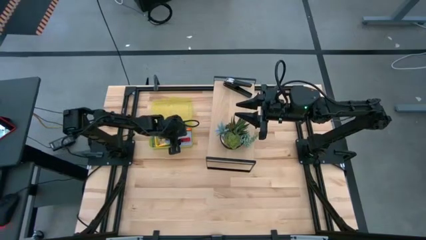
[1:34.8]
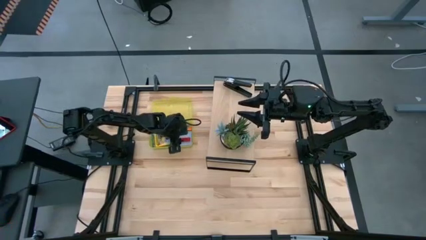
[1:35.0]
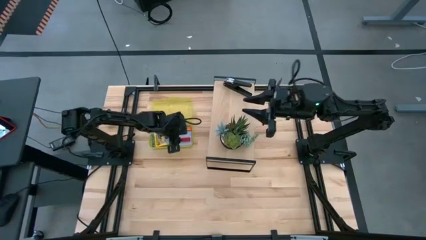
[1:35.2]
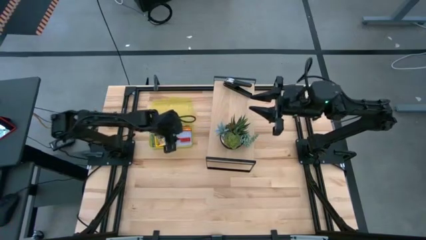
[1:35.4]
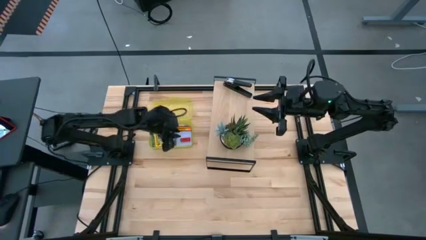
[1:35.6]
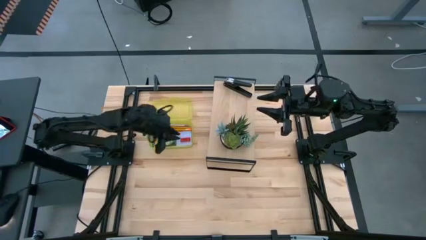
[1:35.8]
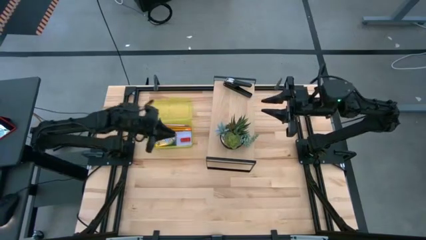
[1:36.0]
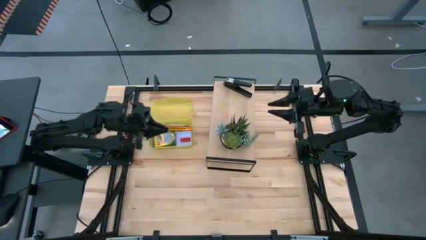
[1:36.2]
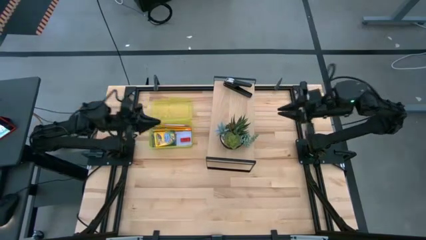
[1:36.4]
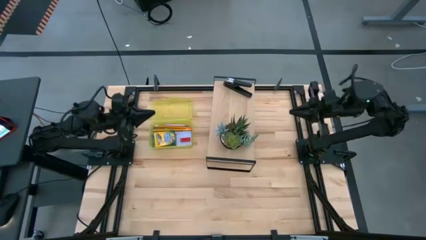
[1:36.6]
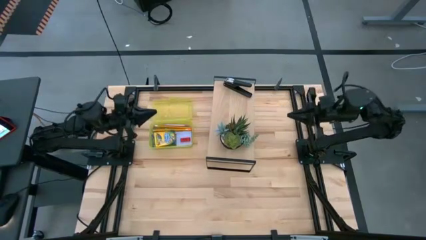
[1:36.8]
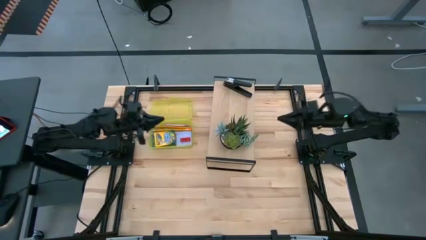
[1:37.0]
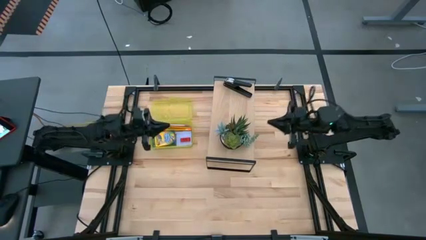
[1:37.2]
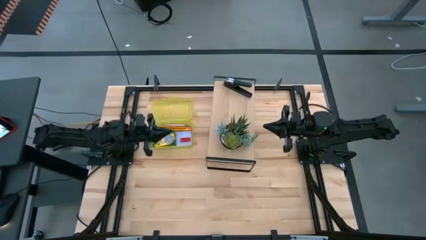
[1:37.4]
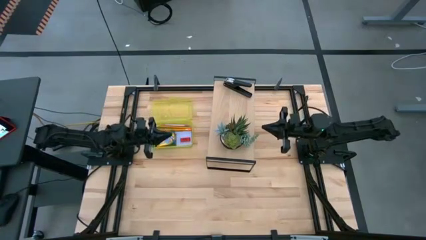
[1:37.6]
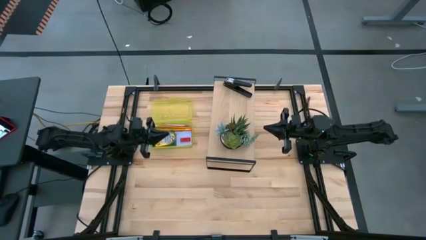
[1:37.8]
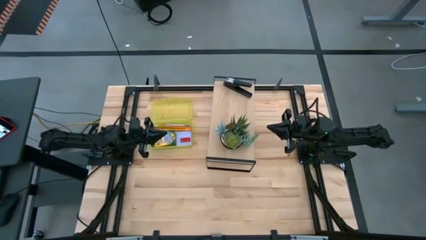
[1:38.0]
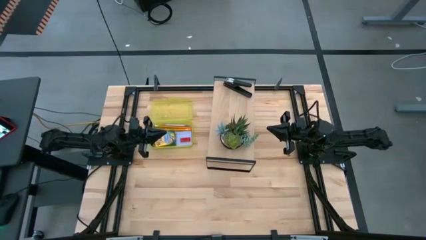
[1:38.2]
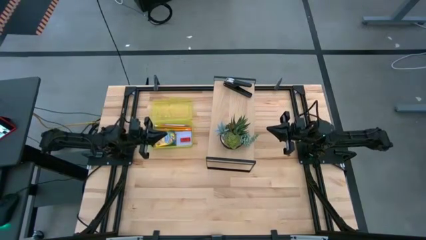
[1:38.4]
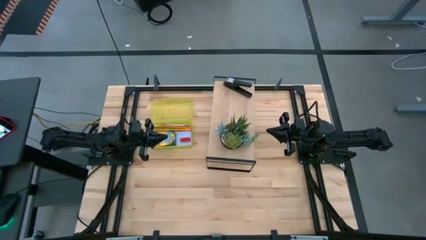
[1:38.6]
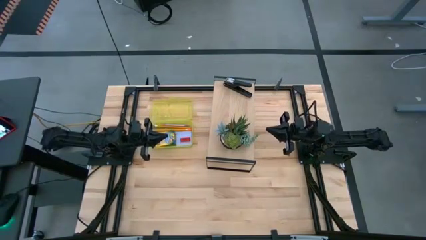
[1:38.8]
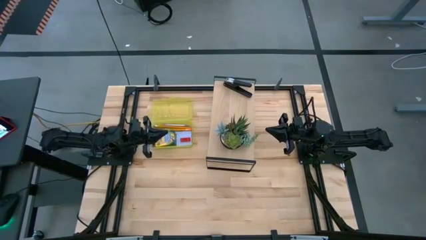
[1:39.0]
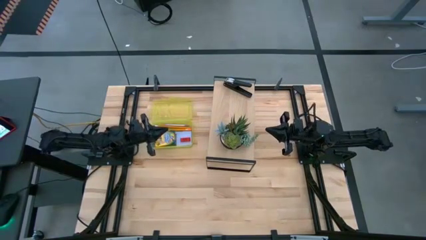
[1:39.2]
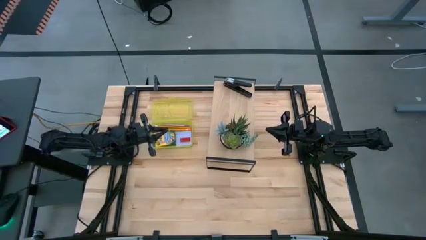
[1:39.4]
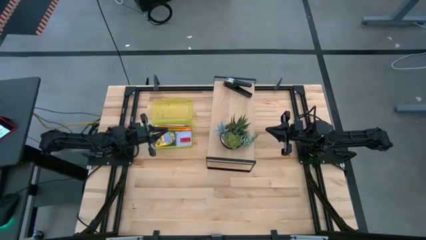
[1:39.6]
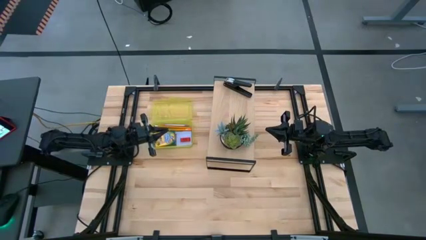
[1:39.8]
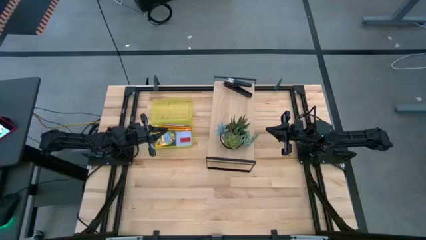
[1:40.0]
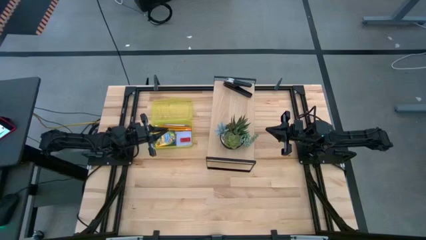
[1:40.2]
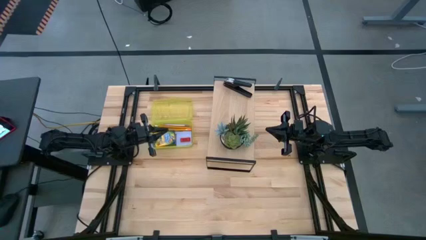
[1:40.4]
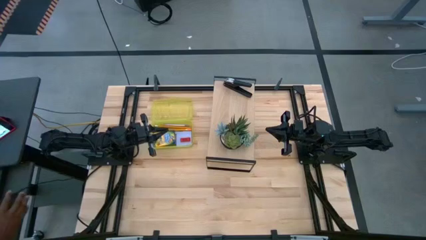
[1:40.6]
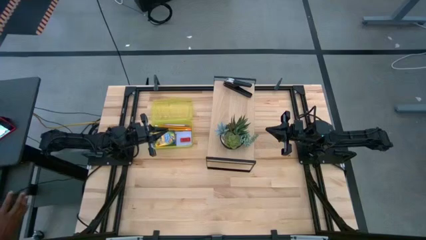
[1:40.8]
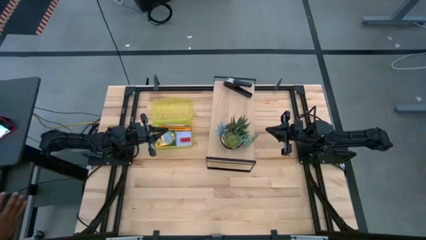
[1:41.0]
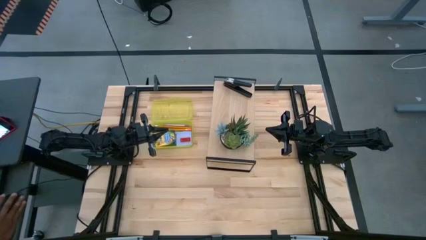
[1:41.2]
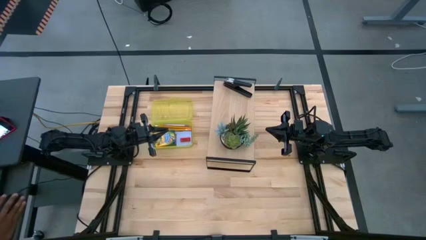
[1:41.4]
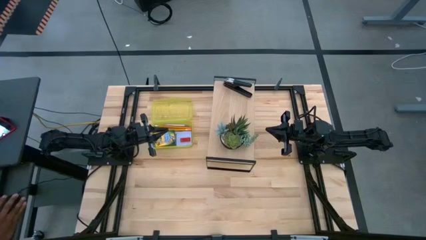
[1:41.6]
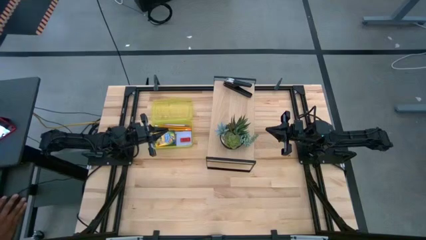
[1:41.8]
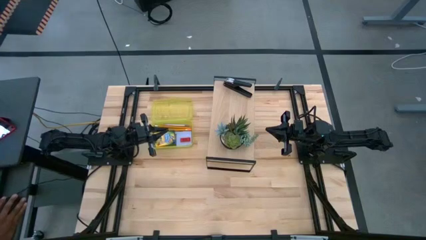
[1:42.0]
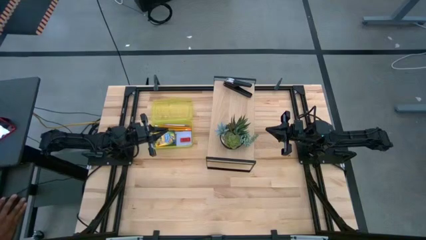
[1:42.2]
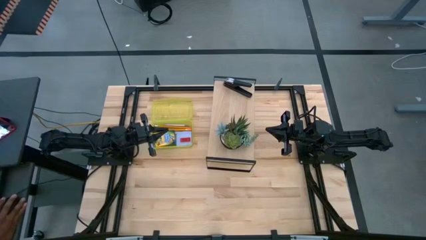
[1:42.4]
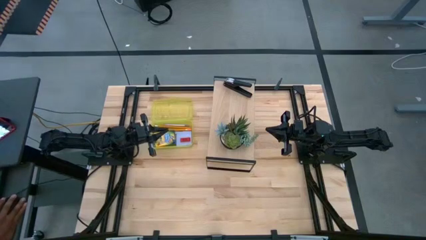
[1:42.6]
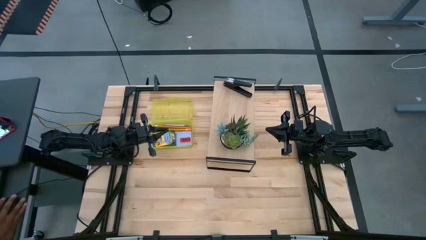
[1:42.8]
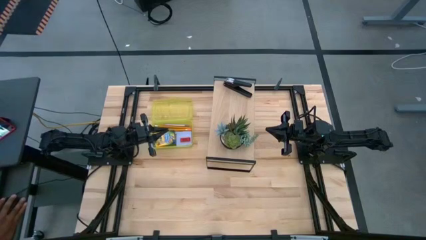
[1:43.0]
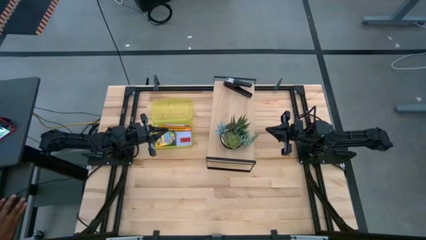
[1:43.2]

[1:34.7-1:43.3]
Task: Pack school essentials
Return to Home Position

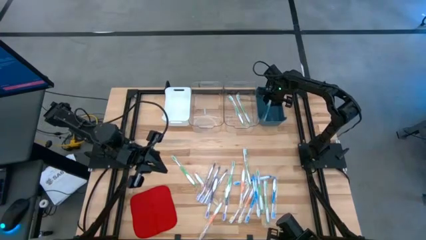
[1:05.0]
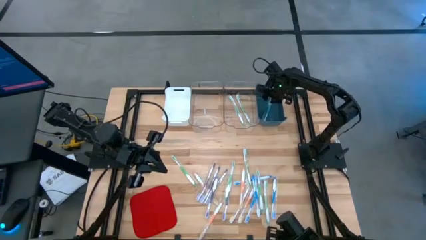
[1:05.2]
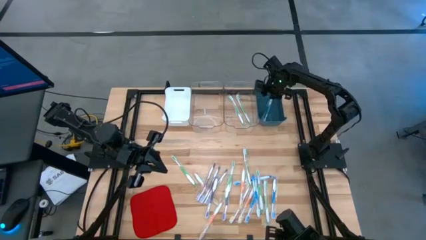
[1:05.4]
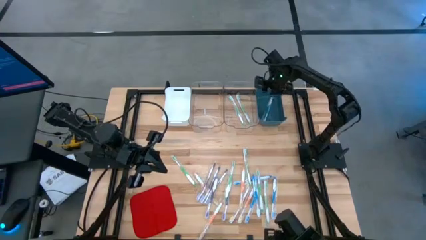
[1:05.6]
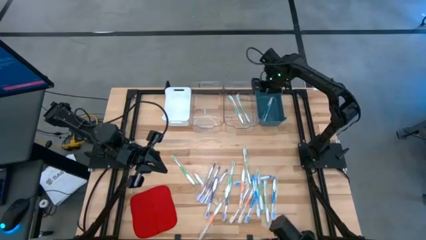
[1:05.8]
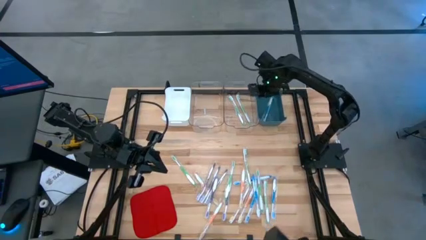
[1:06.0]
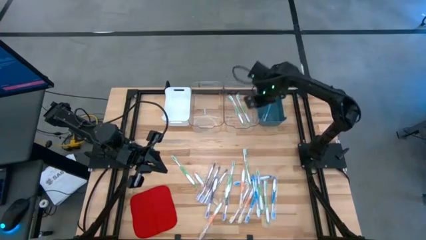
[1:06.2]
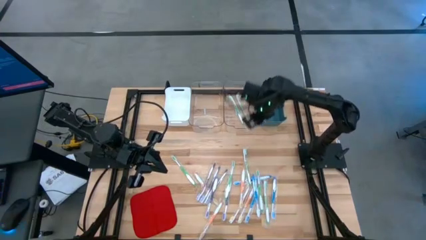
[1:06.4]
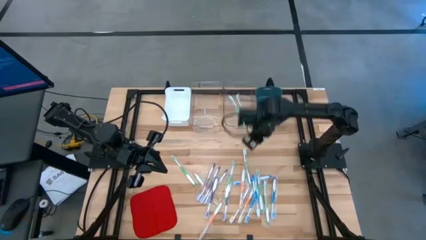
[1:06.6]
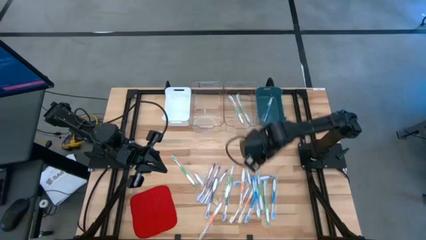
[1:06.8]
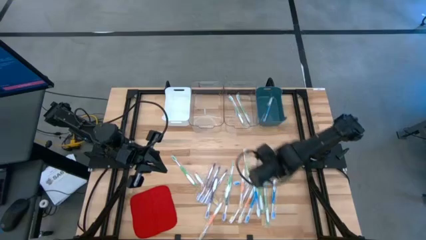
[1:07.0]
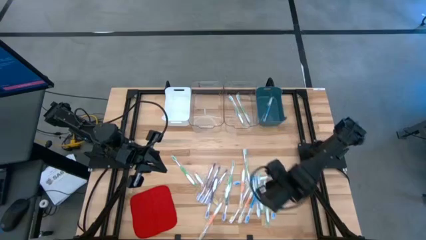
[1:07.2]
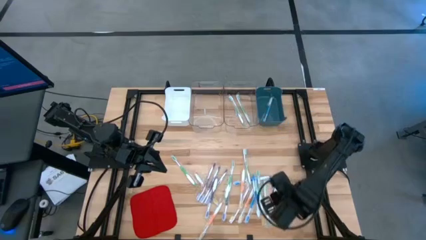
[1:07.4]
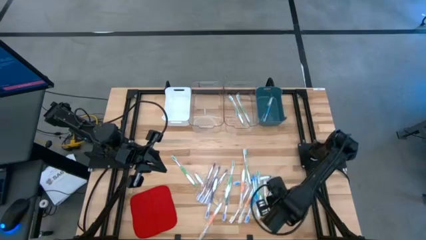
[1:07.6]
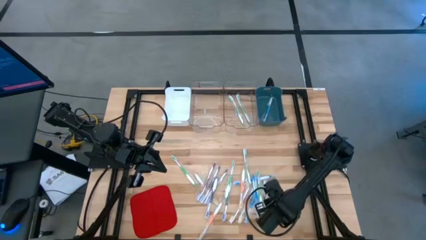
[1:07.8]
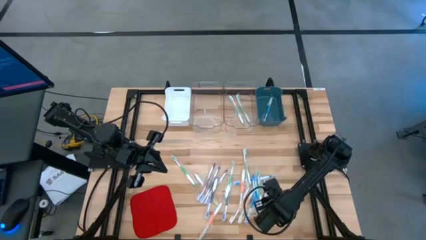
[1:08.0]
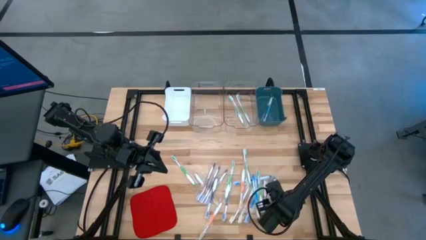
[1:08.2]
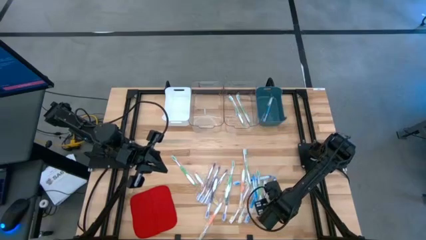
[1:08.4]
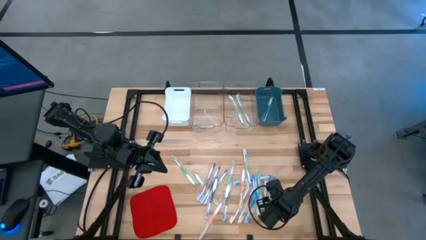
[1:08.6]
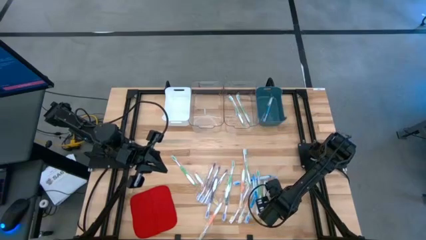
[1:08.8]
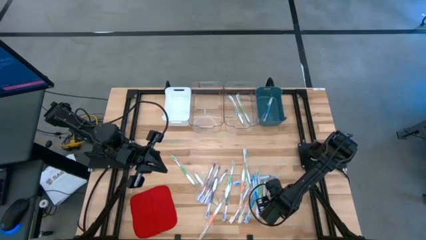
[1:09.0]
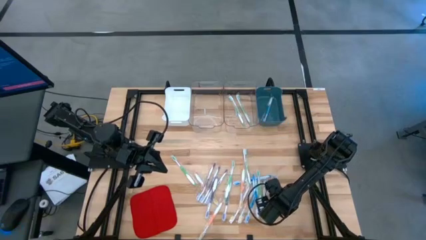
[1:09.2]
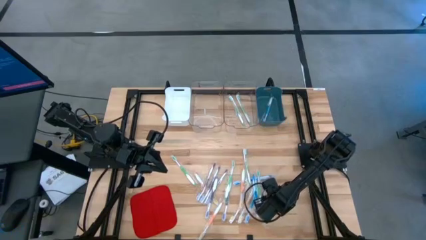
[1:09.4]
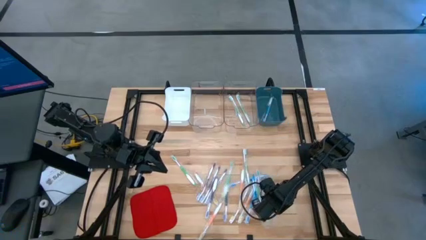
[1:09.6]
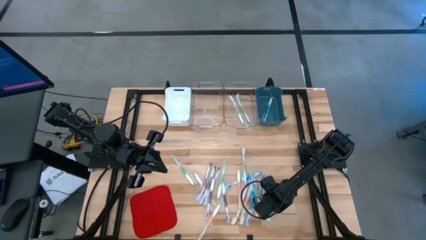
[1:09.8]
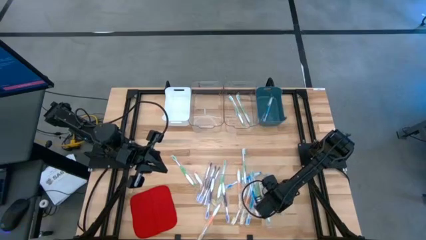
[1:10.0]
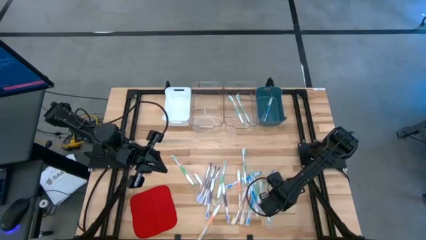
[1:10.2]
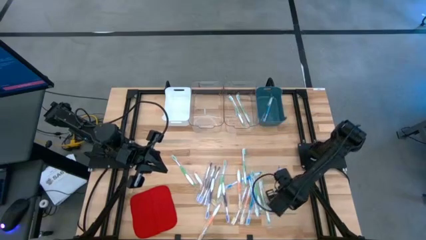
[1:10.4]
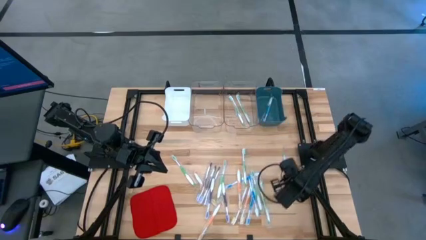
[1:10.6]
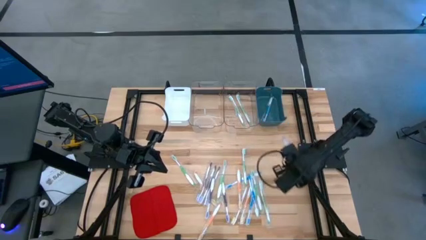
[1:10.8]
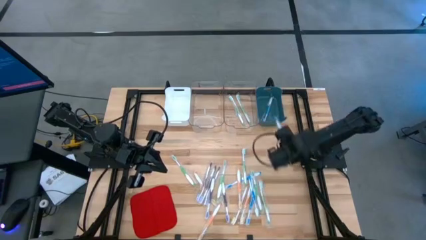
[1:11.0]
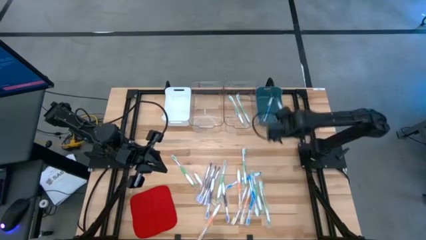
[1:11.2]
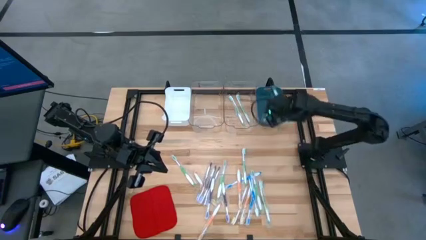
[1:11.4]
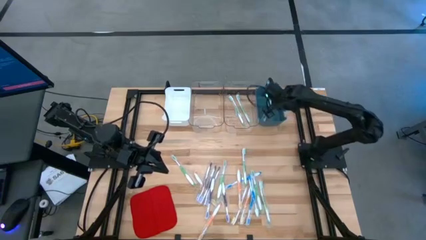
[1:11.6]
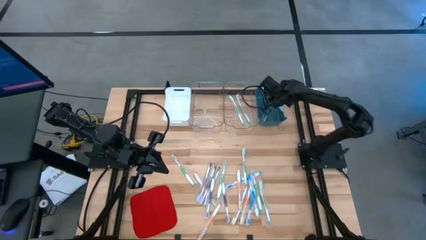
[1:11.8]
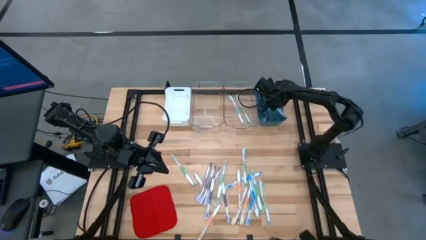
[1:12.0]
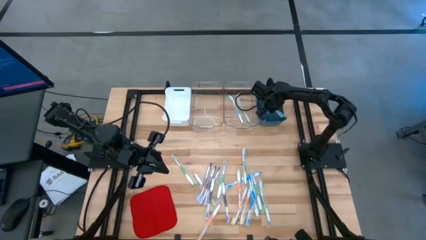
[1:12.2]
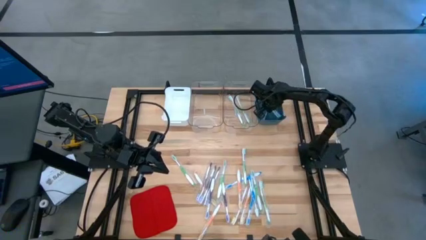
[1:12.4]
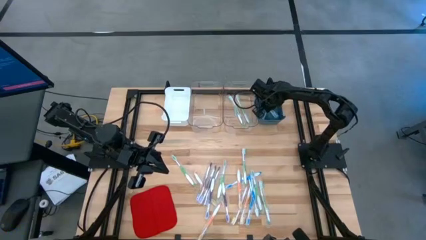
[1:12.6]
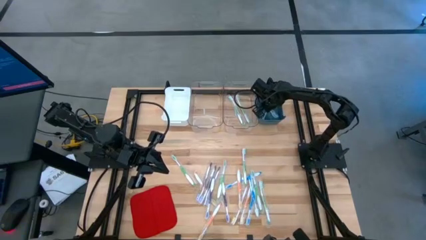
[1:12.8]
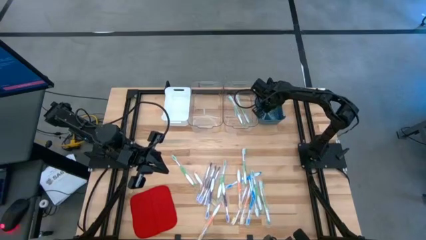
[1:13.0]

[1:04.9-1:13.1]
Task: Pick & Place Toothbrushes
Put the blue toothbrush into the blue bin
